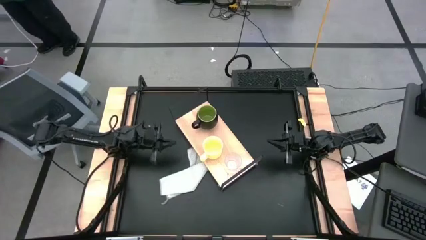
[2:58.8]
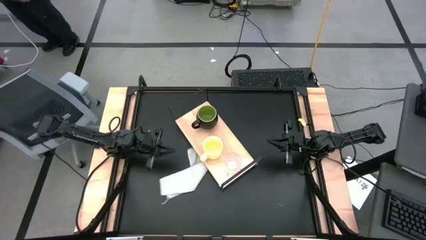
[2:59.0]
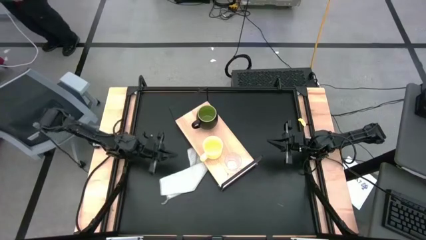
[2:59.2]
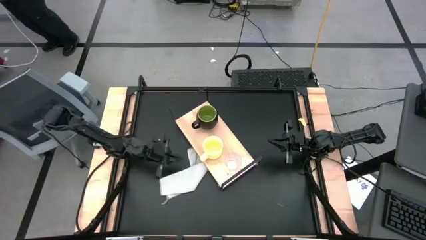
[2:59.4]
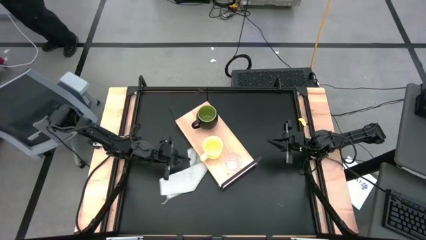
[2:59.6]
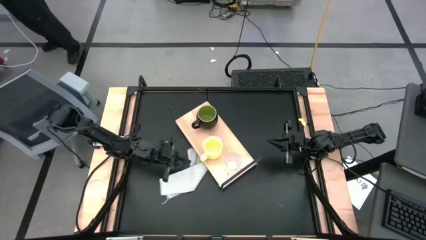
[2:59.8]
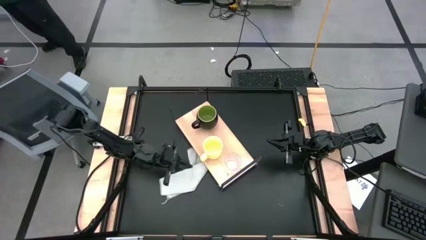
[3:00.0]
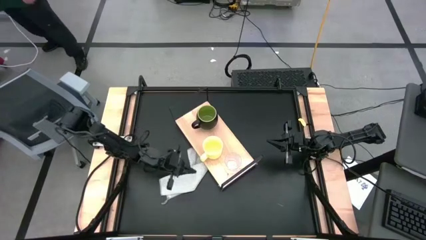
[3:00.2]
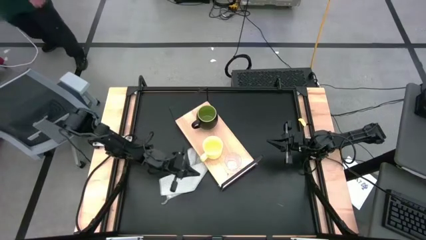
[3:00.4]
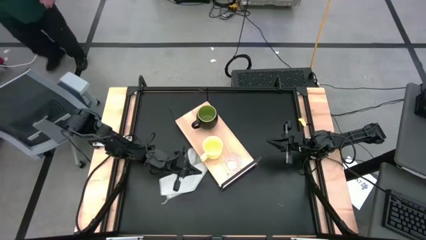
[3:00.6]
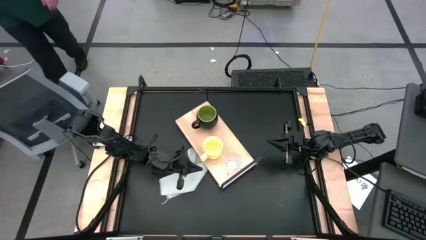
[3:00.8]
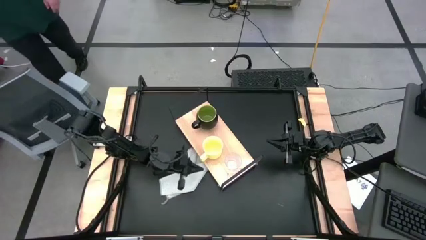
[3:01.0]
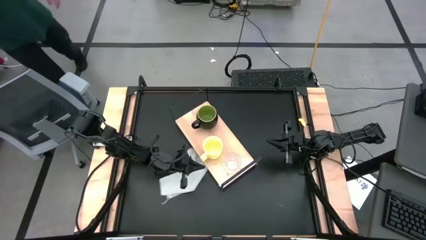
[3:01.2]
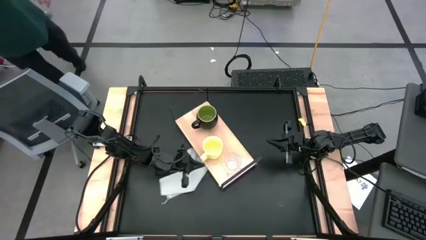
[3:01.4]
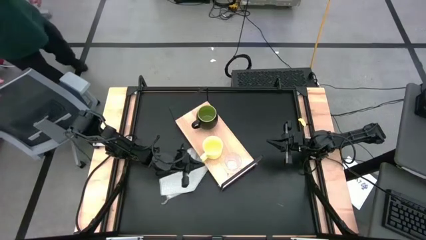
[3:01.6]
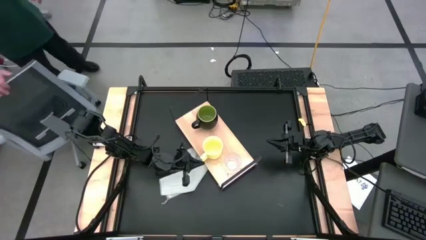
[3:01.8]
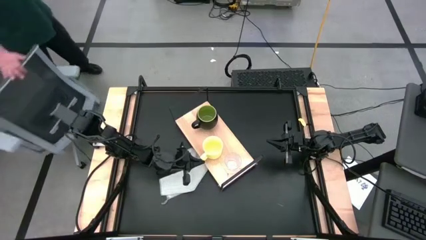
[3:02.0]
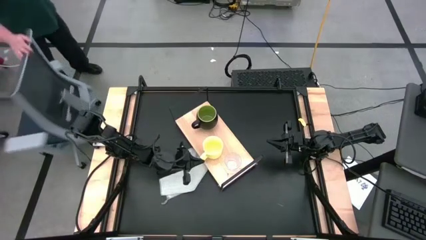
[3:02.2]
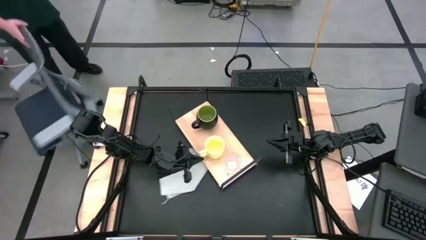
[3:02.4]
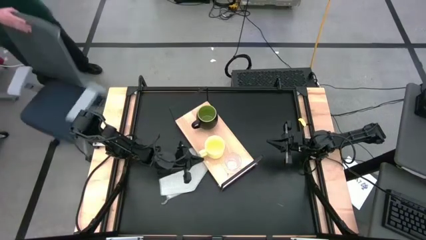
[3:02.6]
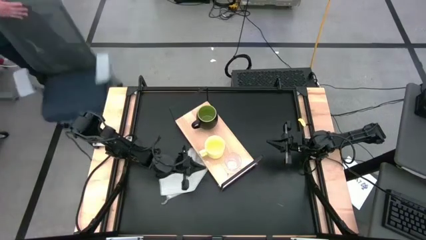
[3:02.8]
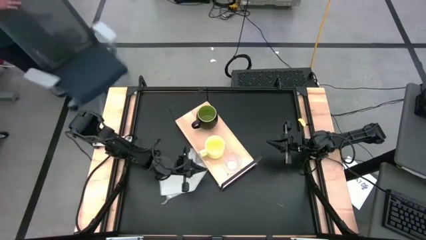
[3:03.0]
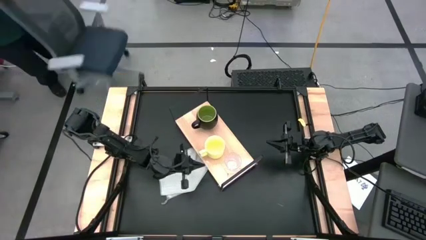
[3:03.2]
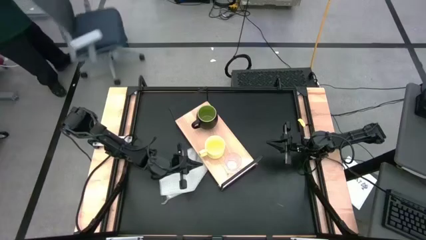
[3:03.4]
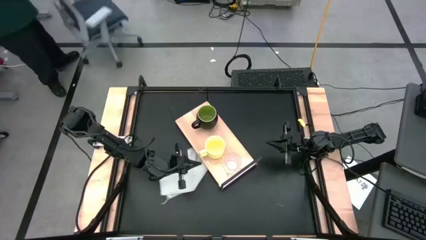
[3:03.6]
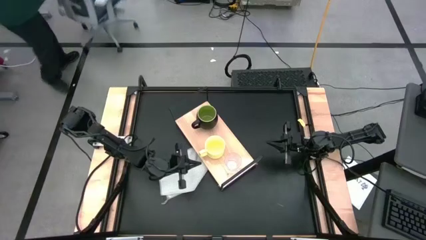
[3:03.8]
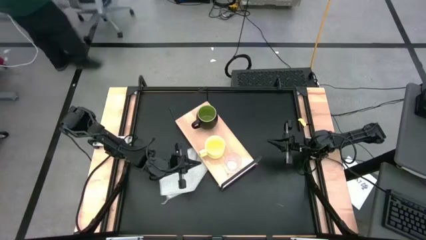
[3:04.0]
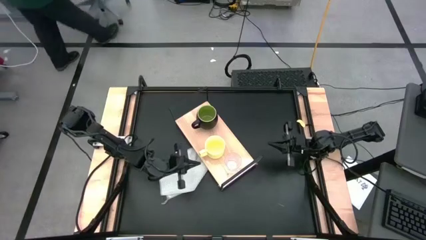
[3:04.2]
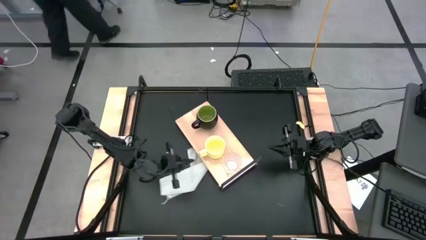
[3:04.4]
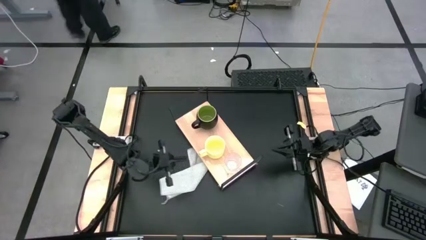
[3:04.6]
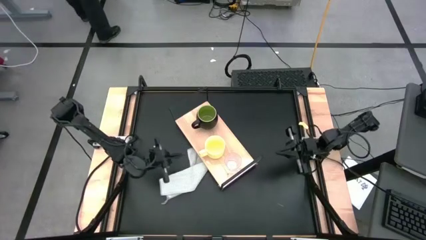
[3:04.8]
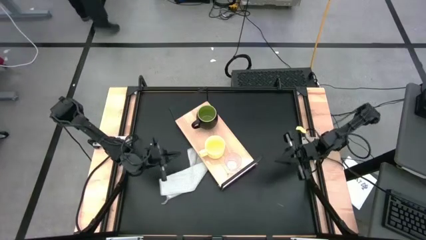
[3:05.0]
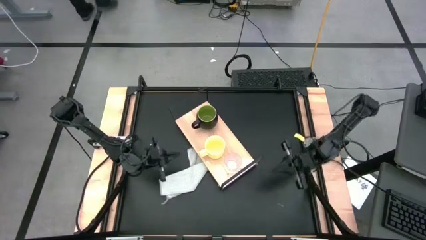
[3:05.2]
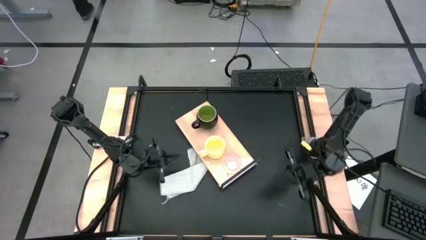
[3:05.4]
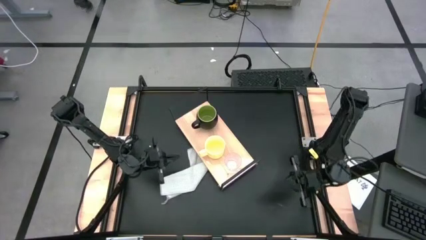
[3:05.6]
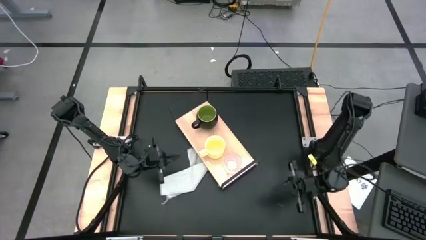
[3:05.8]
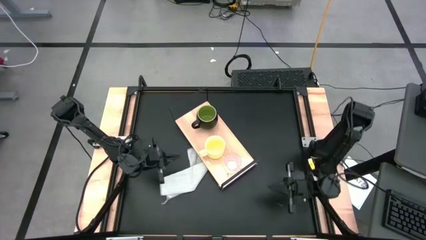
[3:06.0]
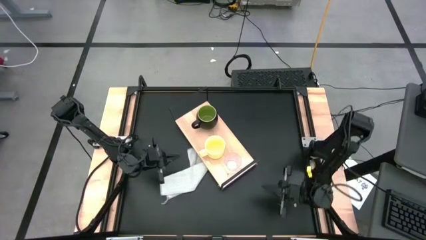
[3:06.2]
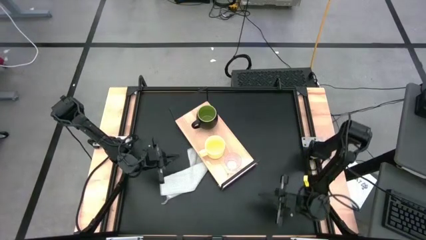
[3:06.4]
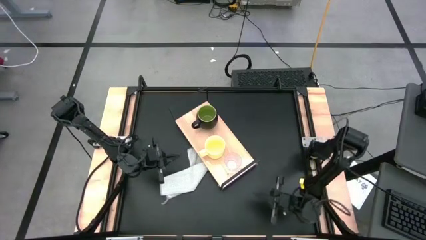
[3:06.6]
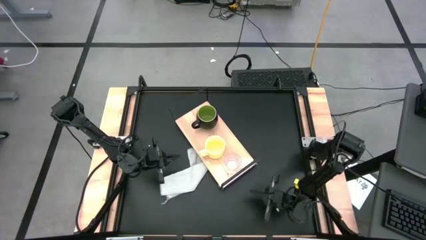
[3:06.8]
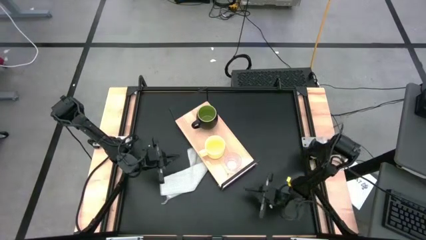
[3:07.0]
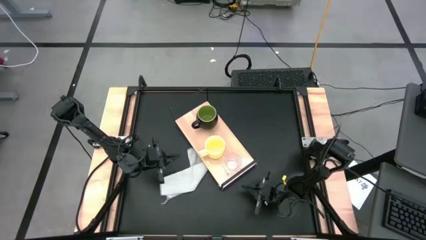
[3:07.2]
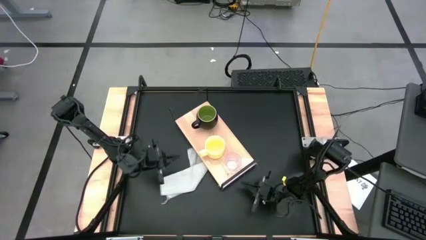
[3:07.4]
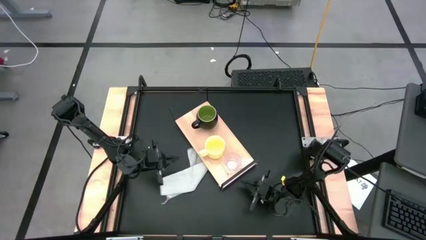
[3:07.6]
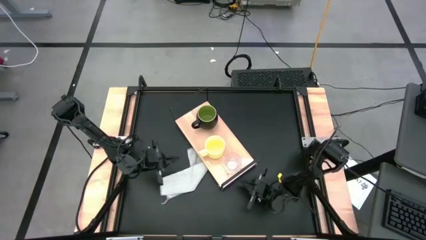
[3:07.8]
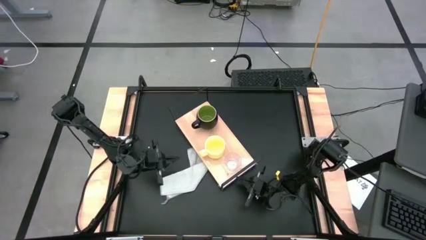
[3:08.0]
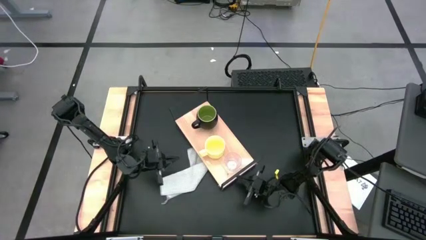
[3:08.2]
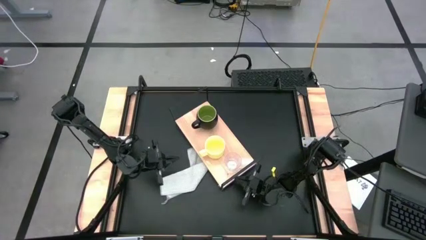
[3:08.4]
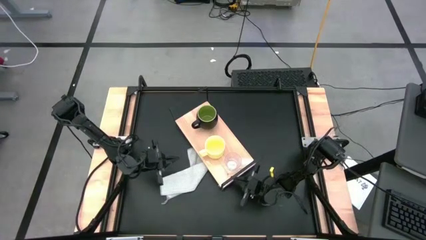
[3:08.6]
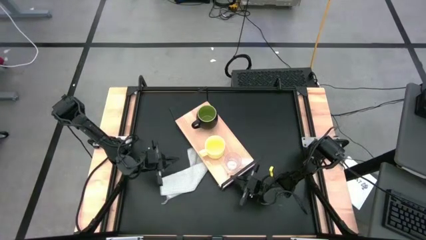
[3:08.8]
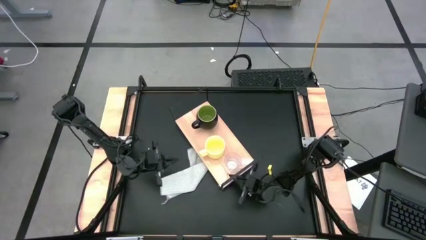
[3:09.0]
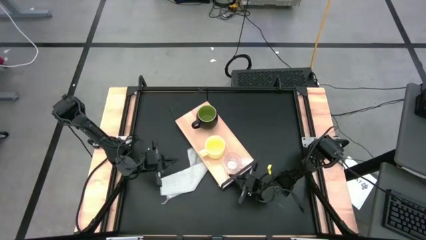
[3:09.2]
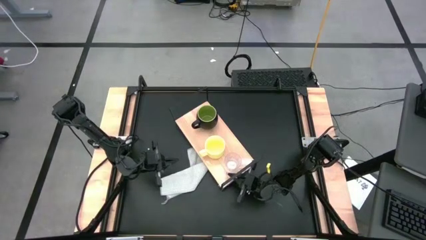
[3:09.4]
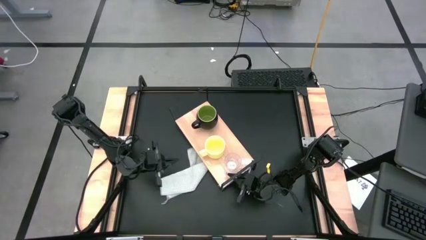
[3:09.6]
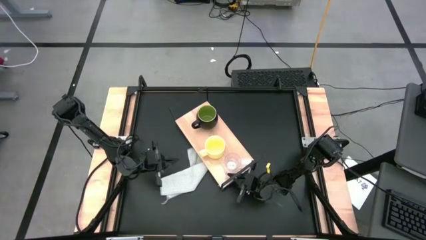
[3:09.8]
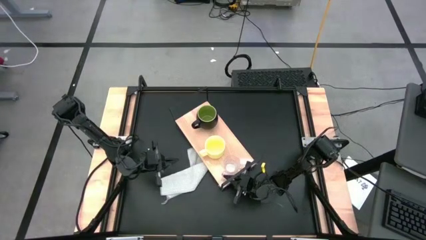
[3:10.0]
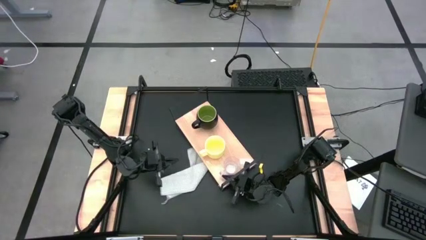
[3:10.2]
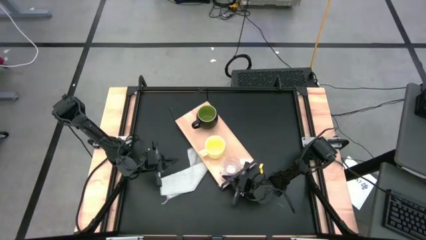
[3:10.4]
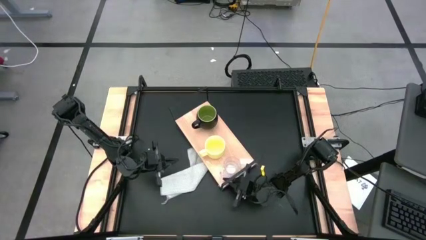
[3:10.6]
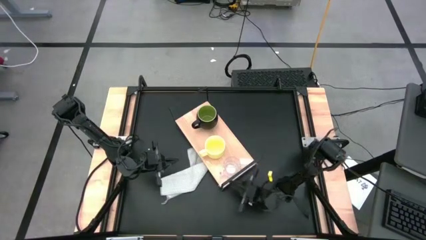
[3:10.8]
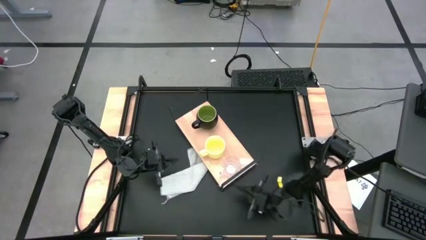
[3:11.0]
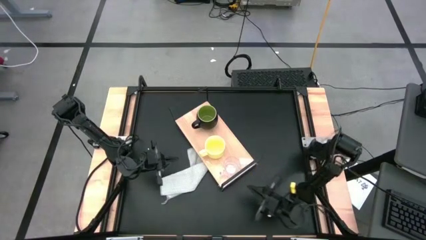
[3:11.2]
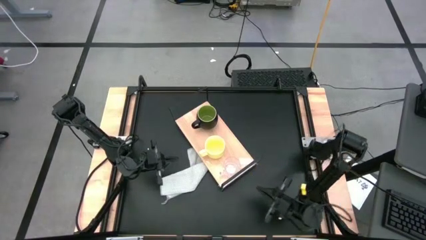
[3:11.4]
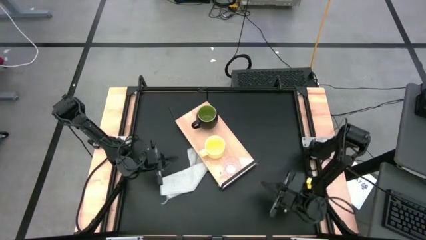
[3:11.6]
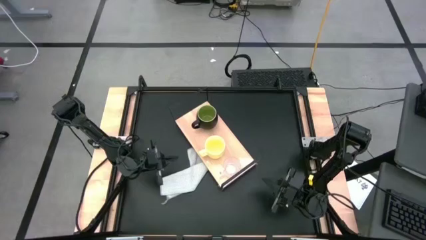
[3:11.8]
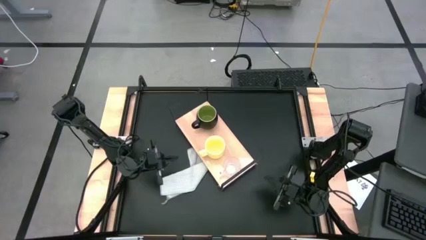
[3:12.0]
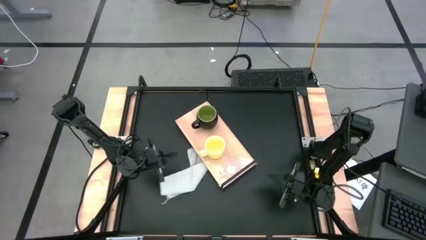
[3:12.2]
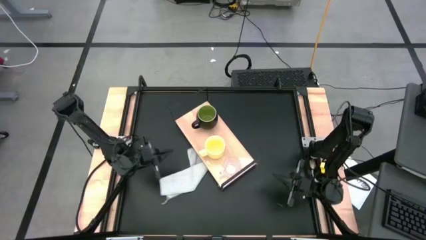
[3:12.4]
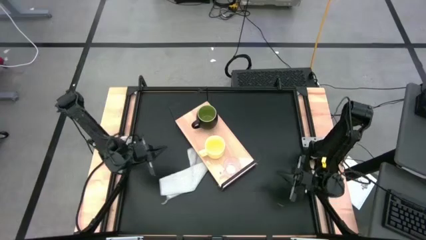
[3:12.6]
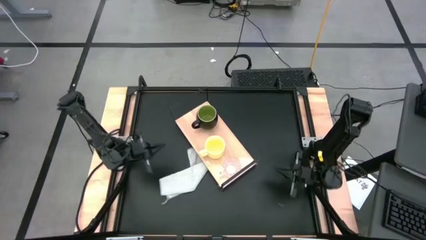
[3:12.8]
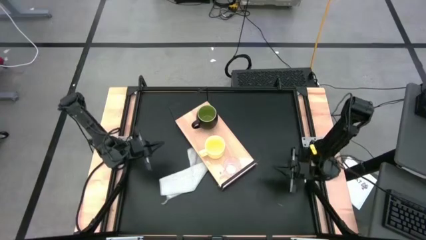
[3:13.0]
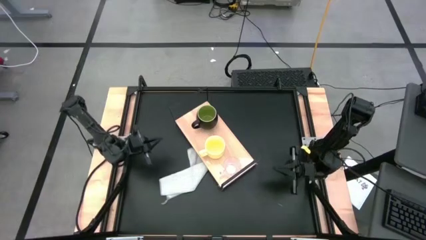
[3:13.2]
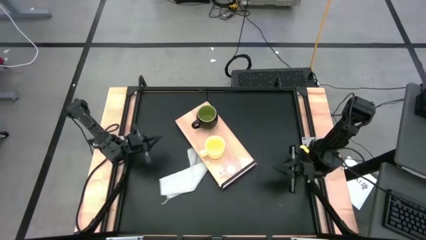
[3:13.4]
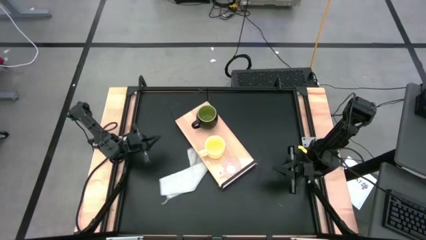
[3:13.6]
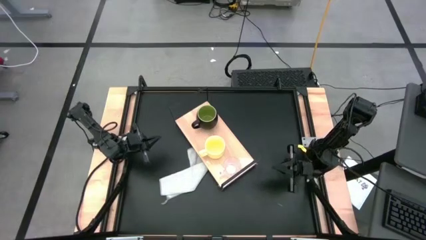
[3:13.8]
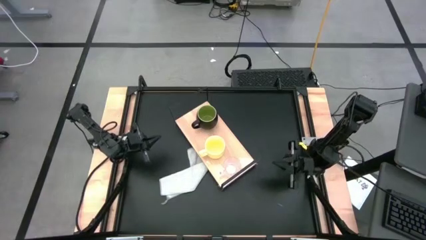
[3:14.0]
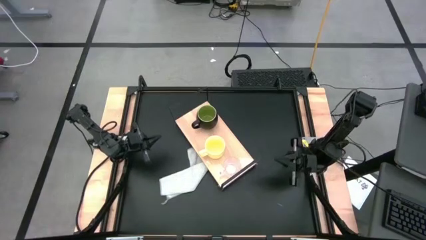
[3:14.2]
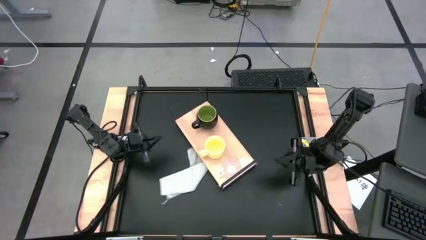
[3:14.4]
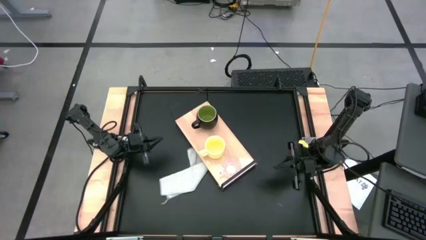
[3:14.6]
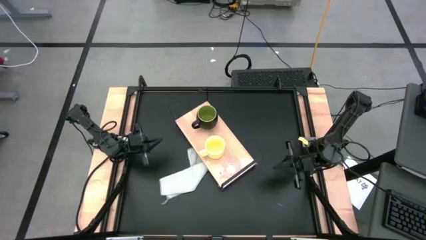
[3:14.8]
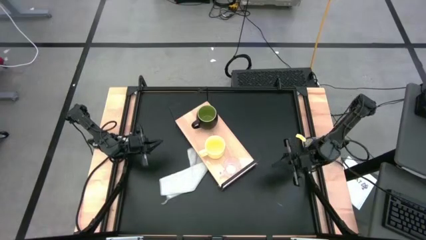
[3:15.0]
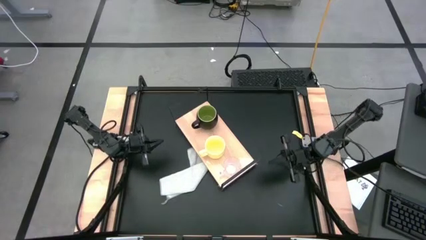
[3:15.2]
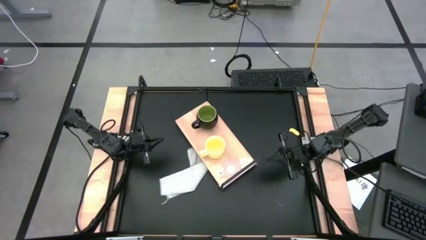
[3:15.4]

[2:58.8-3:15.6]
Task: Stack small to large cups/mugs on shelf
Adjust all the mugs
